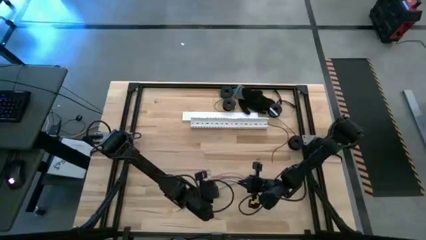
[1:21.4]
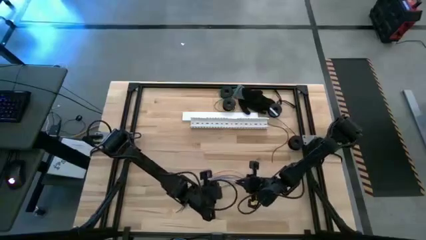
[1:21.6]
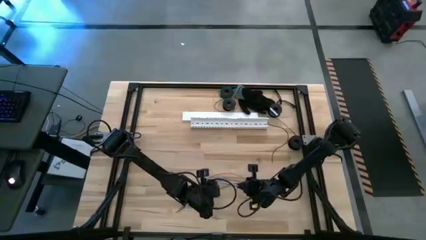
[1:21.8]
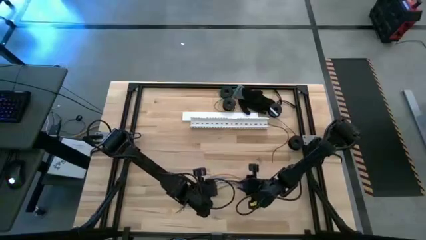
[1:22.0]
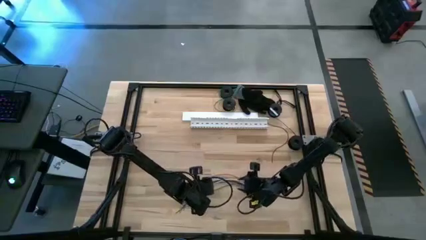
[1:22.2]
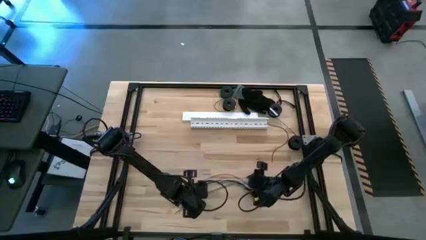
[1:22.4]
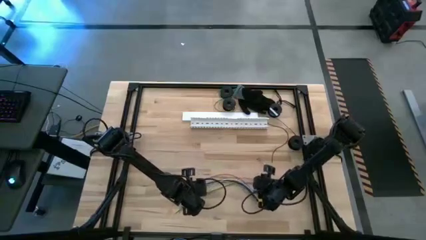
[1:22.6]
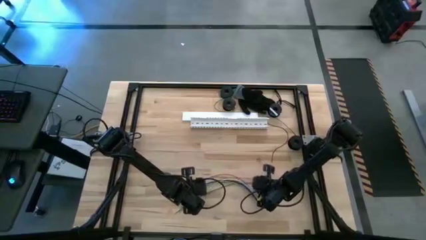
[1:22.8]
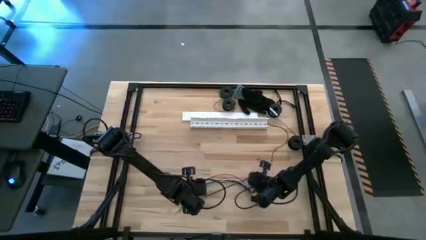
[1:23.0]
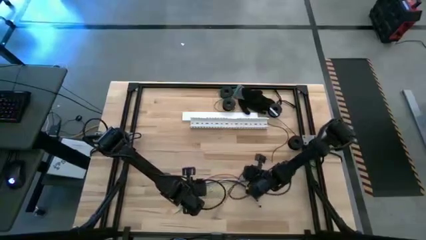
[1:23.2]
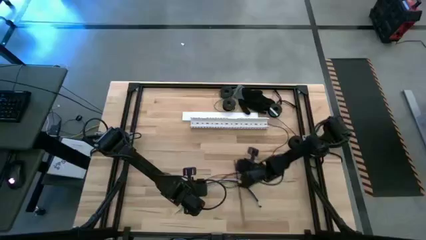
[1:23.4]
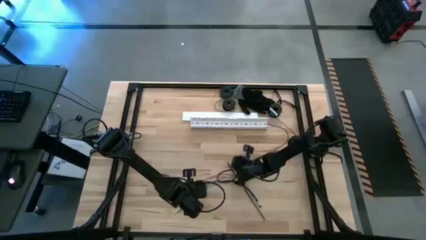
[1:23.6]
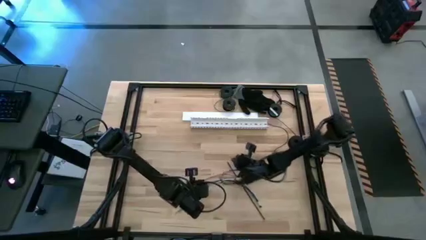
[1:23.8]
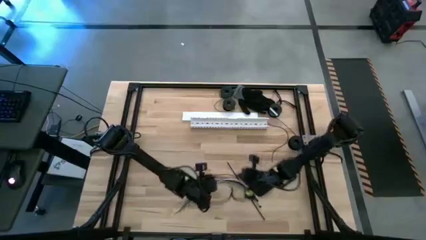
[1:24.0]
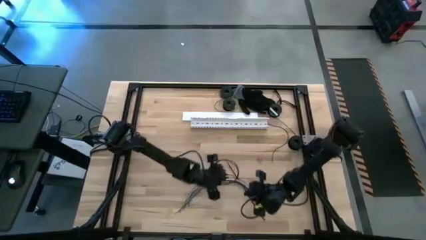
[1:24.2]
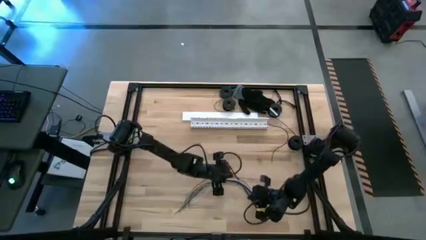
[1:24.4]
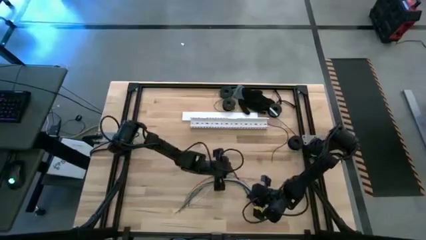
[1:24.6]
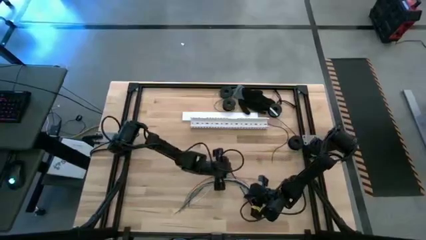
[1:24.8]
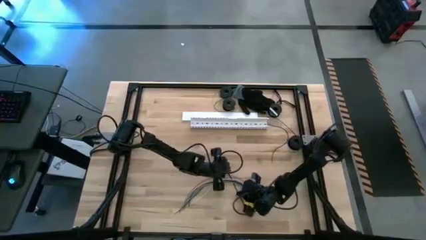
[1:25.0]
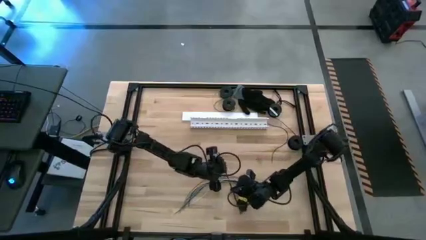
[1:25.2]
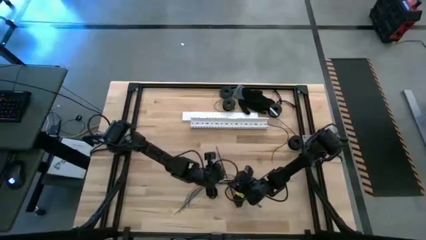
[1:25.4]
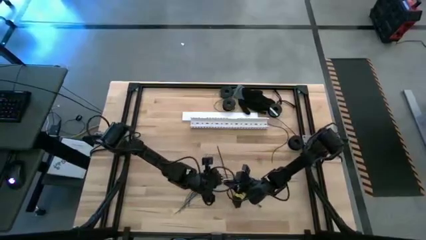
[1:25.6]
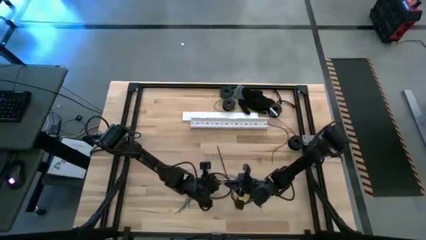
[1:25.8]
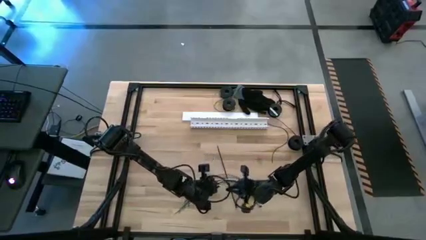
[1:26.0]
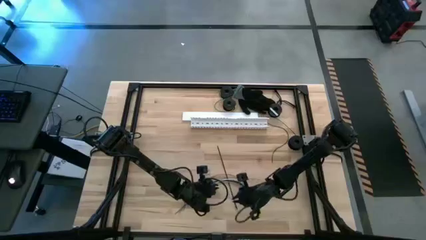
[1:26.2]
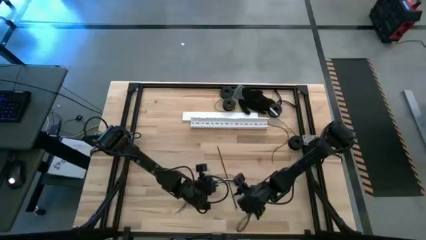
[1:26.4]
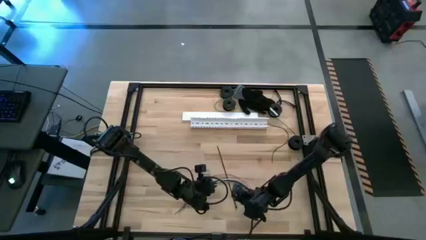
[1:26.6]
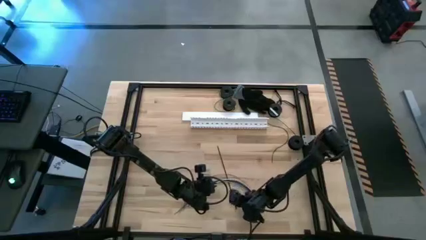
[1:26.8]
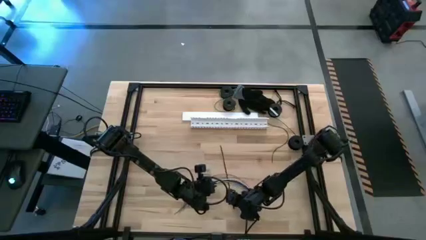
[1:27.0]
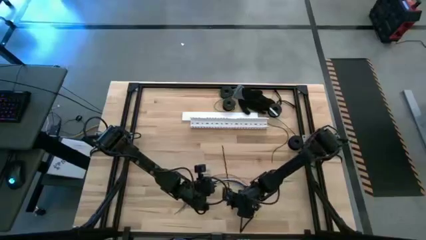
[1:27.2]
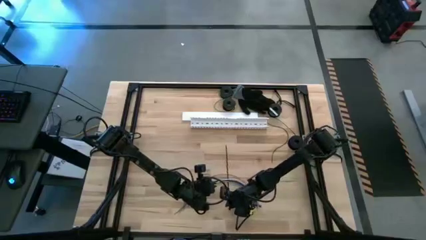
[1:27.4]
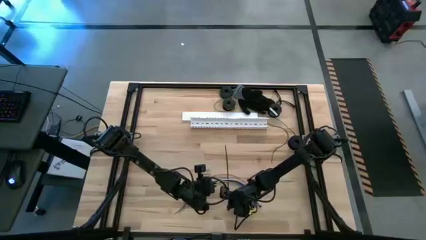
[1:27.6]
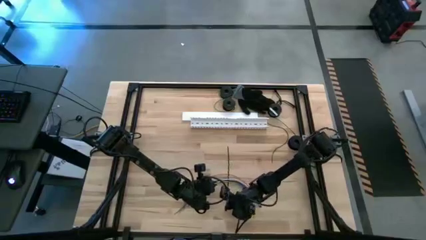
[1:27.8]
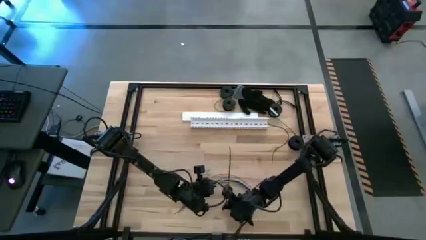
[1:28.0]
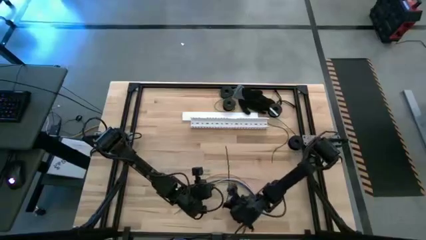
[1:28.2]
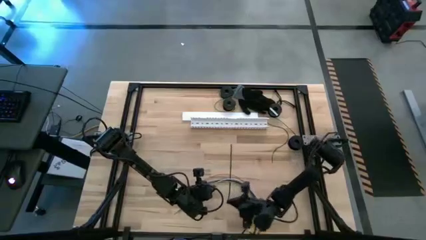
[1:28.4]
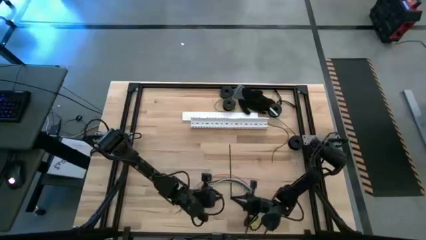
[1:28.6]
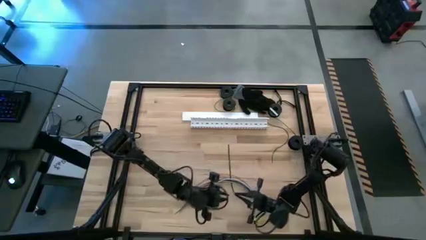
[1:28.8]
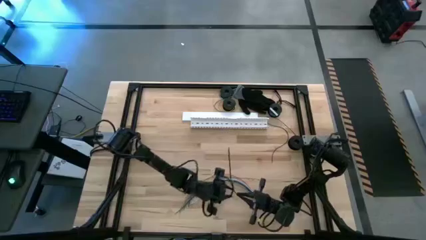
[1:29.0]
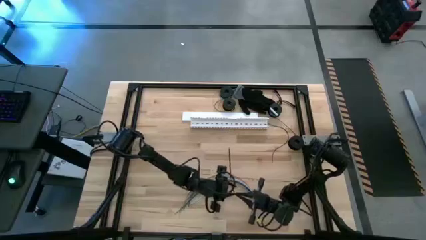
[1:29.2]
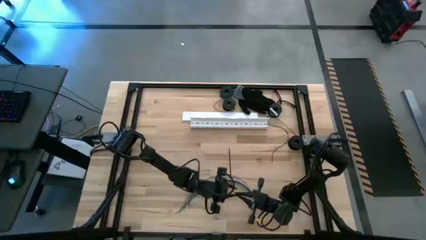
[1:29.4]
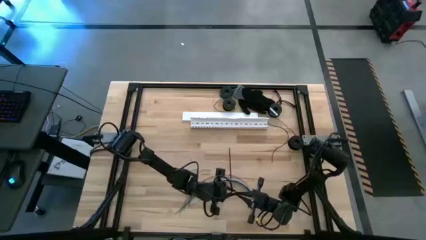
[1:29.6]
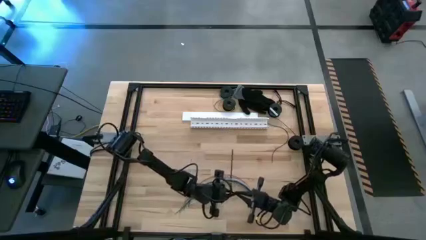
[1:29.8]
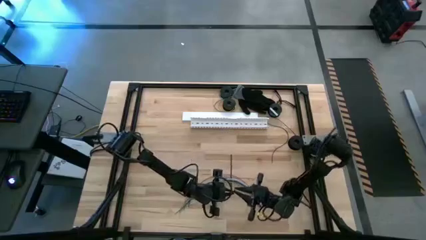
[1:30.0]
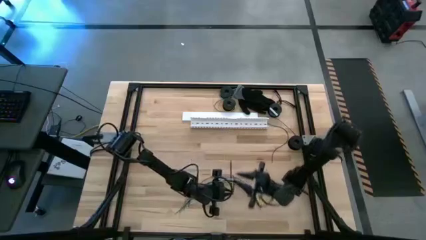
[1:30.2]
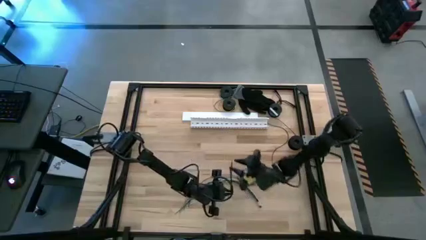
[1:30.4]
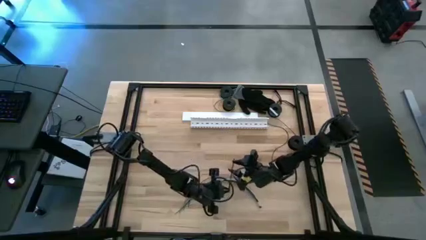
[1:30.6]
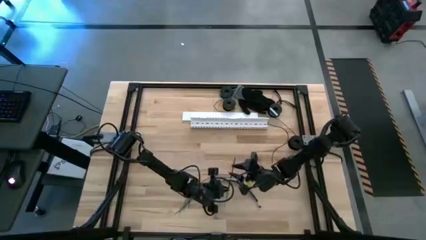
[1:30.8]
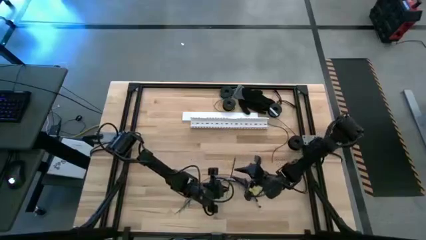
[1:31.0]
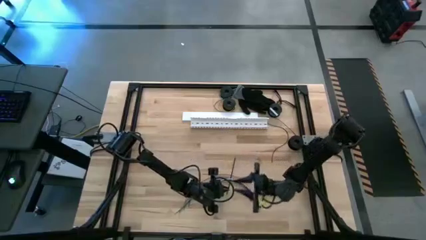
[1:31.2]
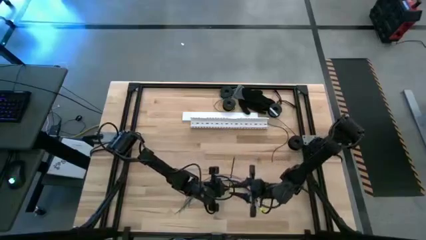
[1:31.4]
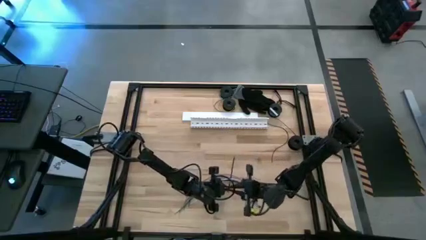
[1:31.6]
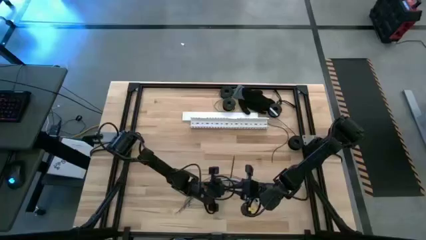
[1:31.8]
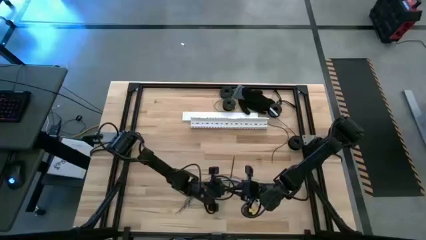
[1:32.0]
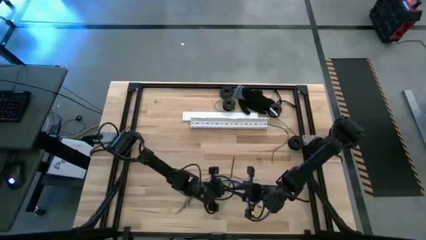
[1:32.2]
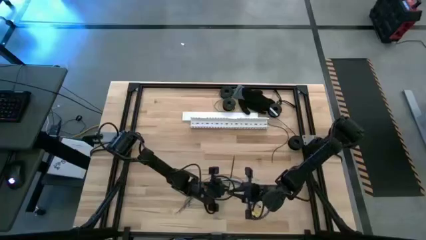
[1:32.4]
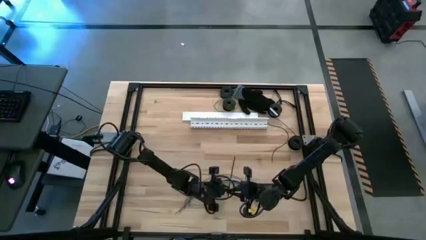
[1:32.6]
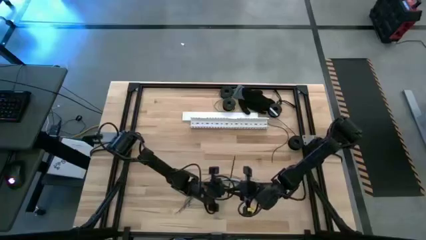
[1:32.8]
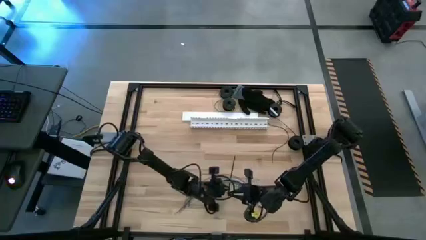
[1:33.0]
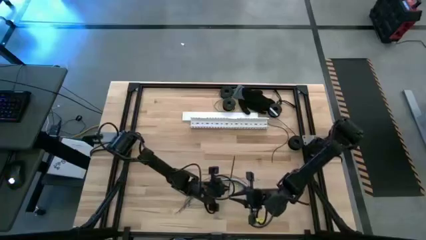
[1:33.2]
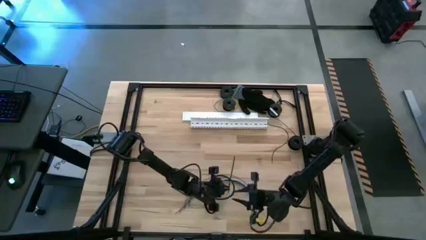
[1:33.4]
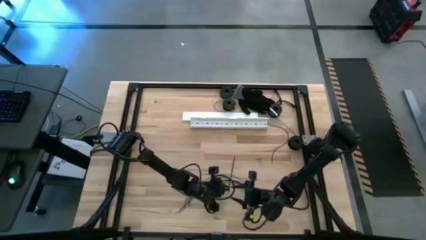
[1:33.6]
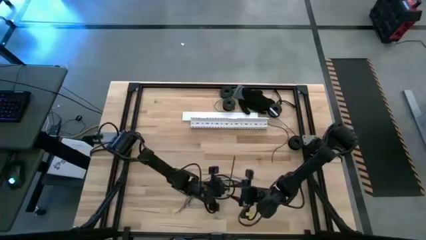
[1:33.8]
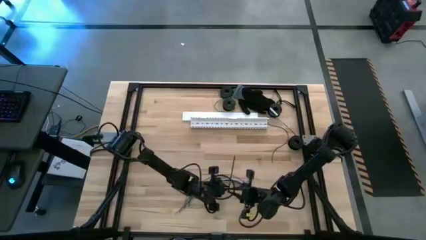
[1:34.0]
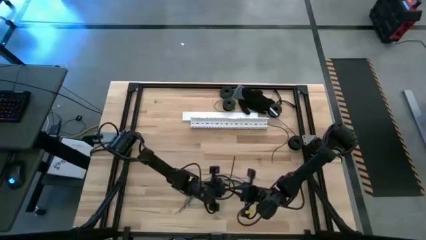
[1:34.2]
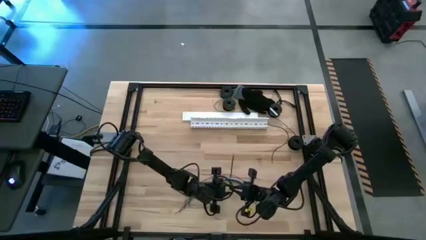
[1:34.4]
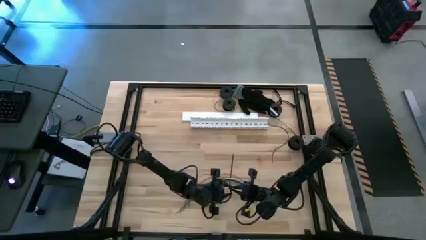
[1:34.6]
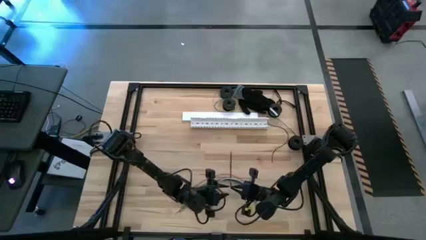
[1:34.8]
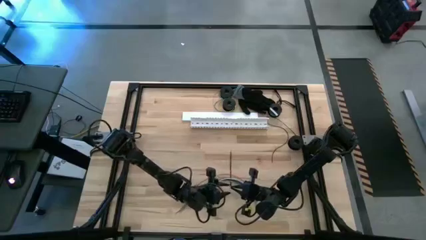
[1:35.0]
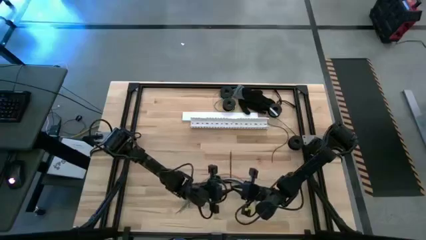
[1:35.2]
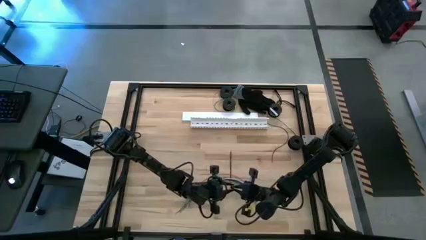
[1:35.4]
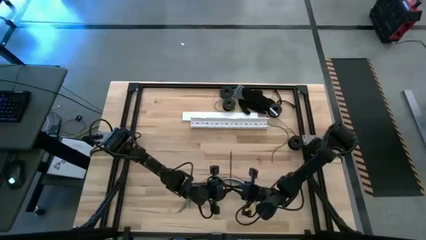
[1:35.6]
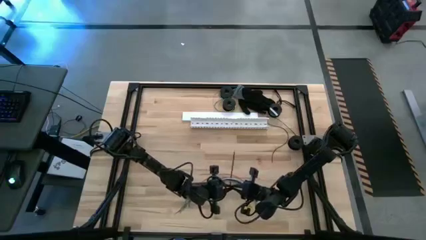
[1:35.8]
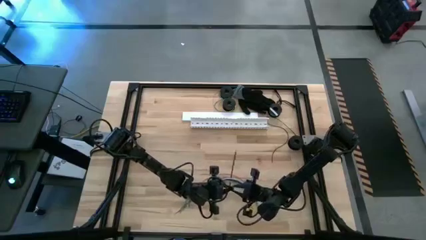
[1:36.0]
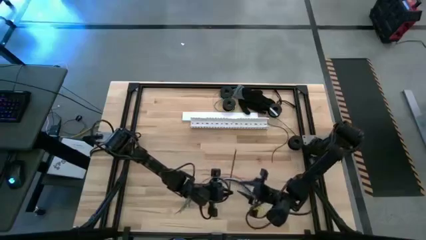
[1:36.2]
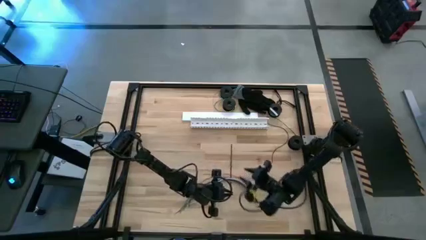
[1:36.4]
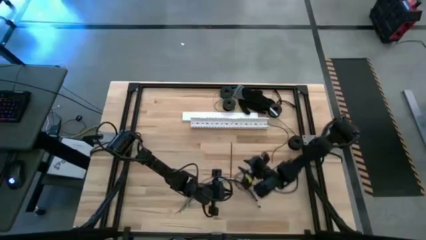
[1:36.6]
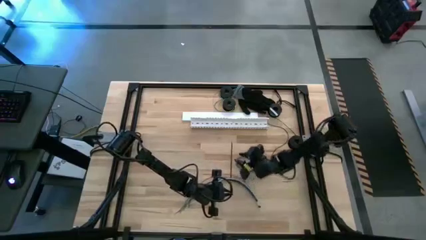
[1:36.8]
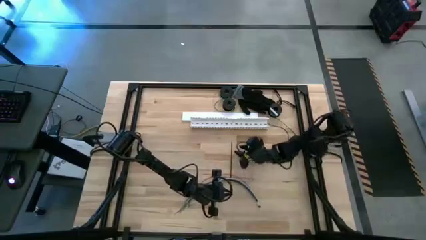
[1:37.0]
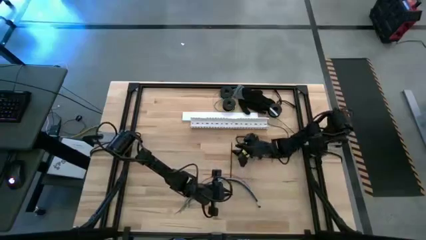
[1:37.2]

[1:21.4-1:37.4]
Task: Ziptie cables
Wrap the cables together using a black zip tie
